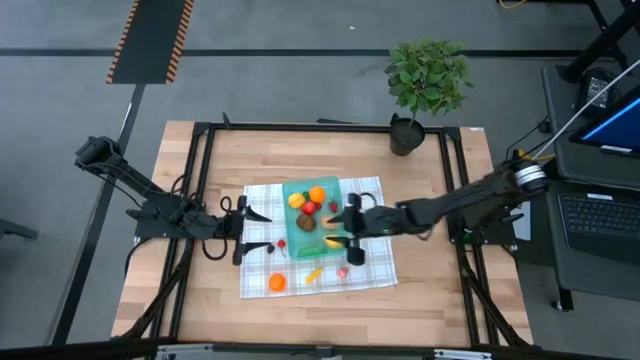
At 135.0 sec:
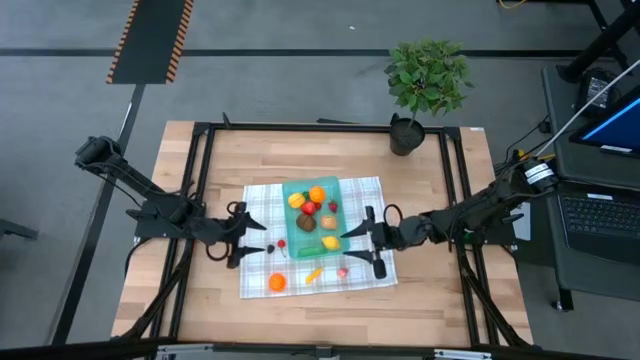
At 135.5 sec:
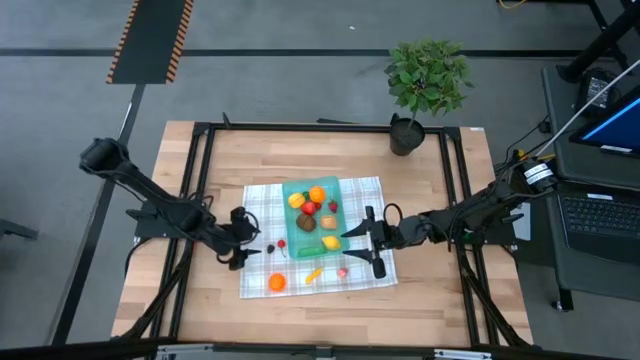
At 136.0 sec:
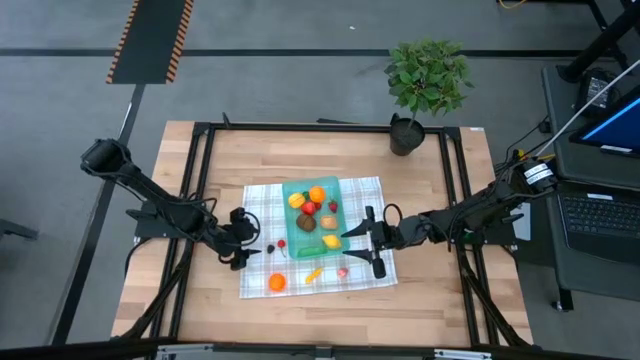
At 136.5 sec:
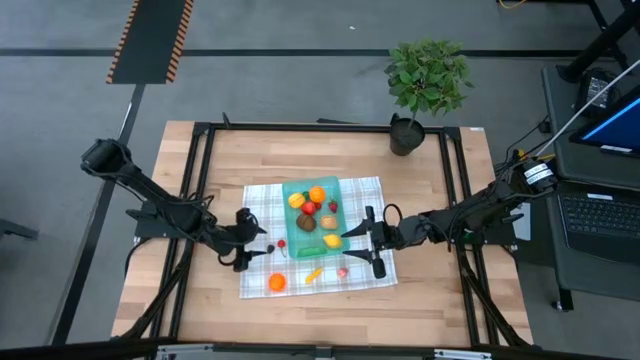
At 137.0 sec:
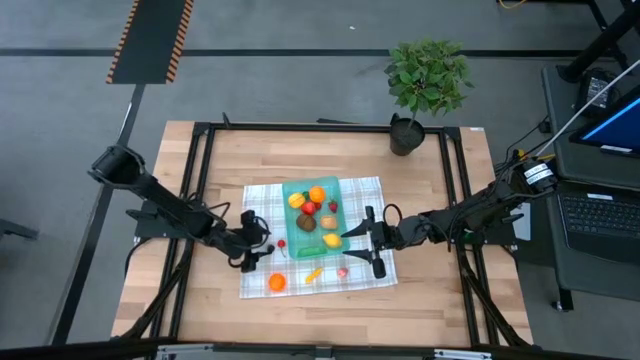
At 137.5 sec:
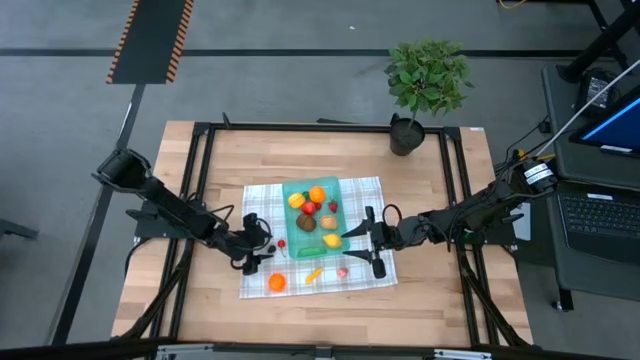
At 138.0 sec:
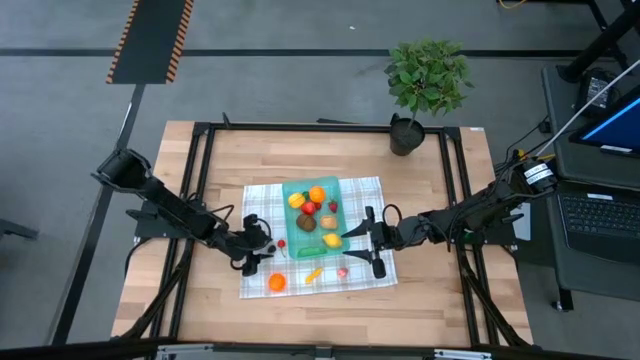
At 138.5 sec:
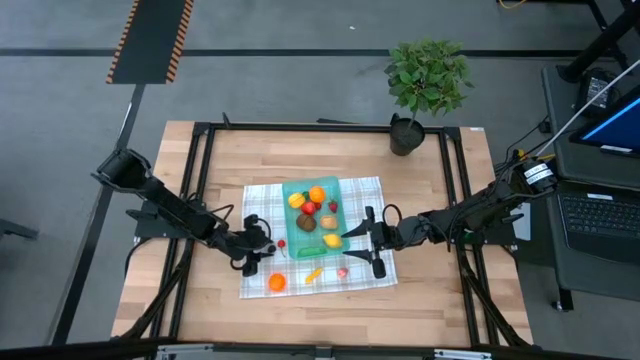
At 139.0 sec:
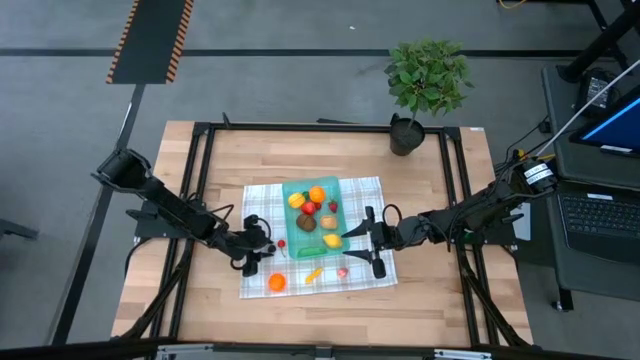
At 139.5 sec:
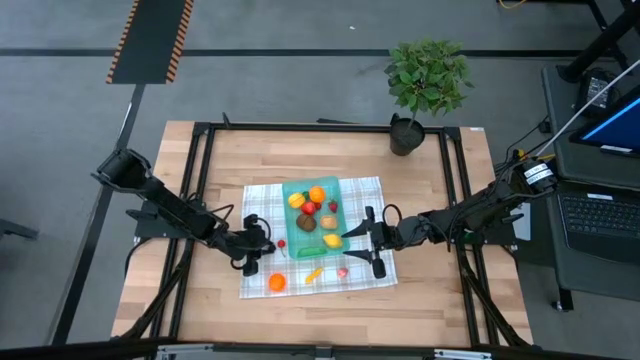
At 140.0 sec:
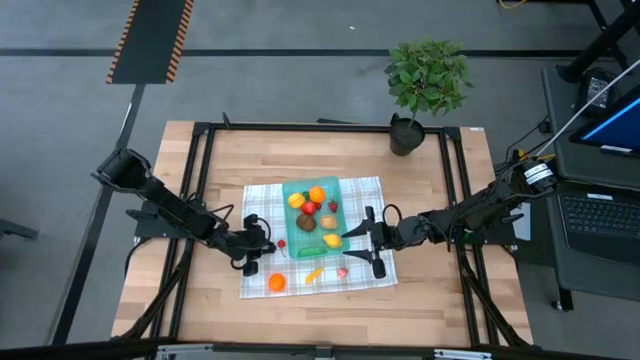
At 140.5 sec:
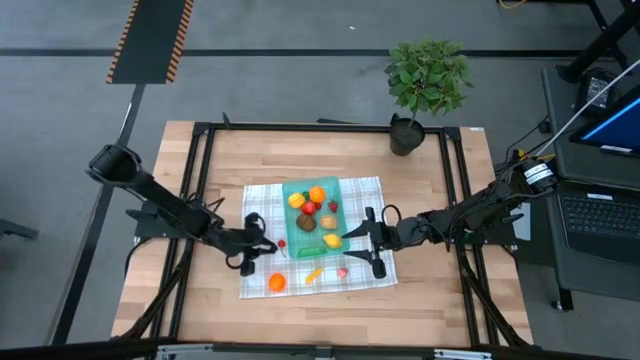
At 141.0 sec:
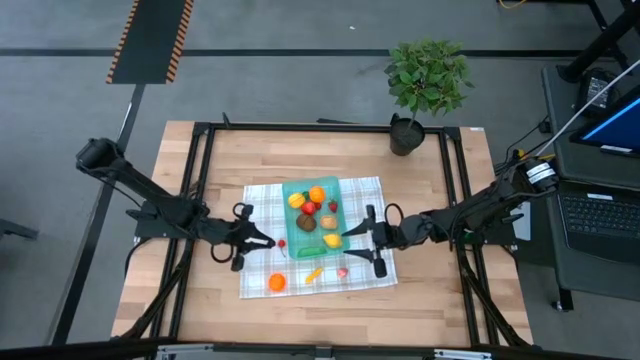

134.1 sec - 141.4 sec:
Task: Pick and placing Produce into tupperware
Put the black raspberry into the blue bin

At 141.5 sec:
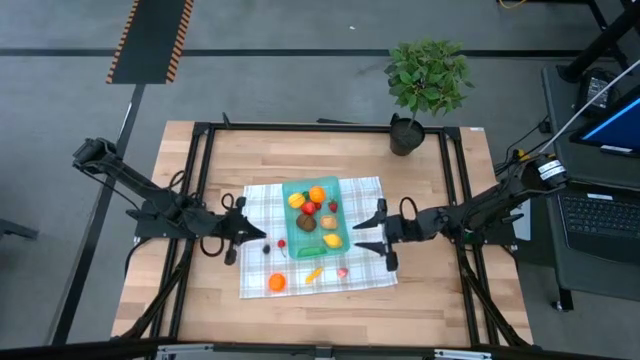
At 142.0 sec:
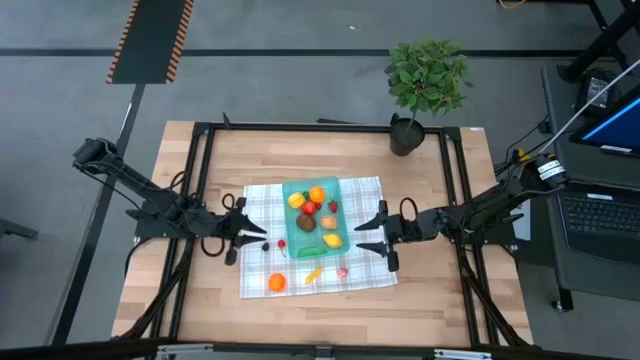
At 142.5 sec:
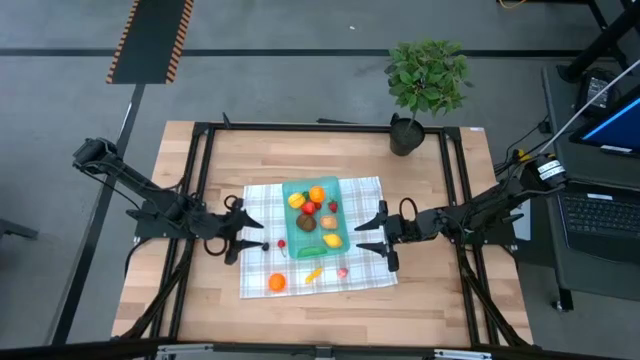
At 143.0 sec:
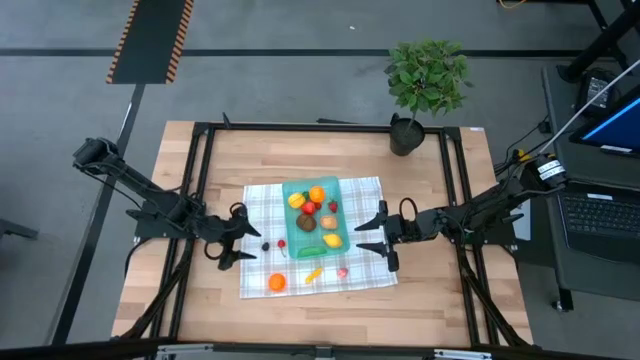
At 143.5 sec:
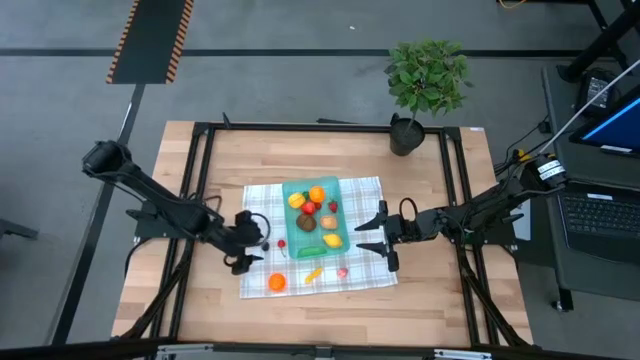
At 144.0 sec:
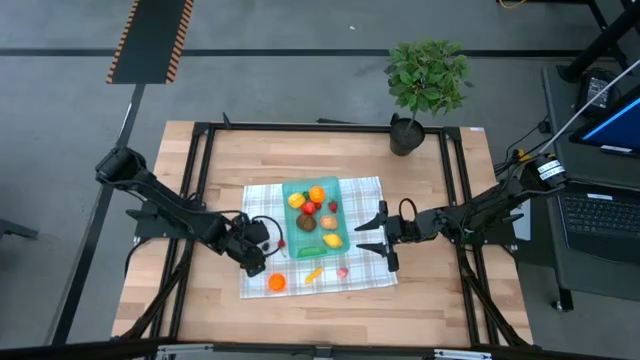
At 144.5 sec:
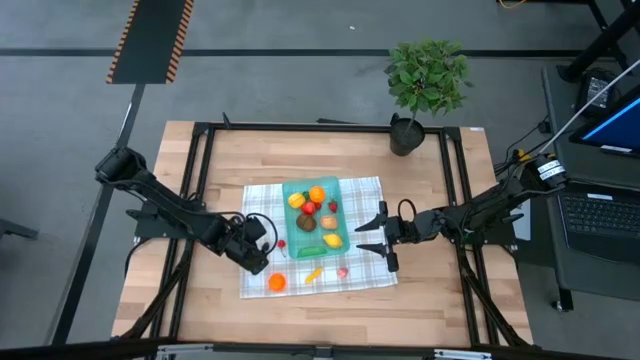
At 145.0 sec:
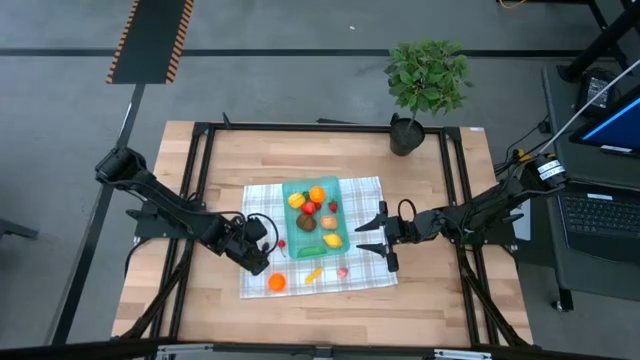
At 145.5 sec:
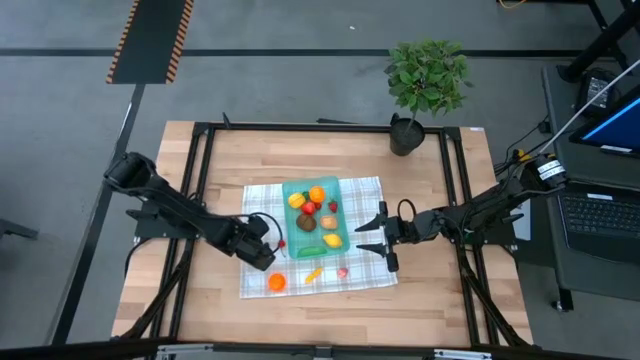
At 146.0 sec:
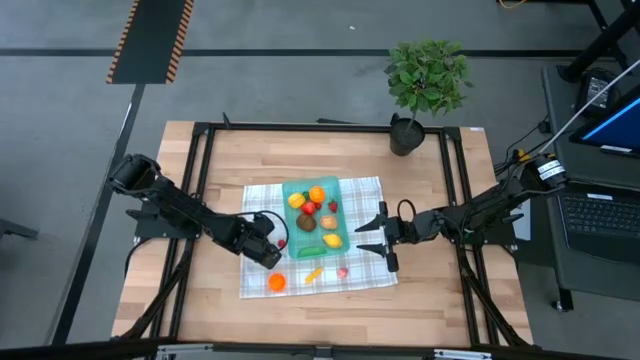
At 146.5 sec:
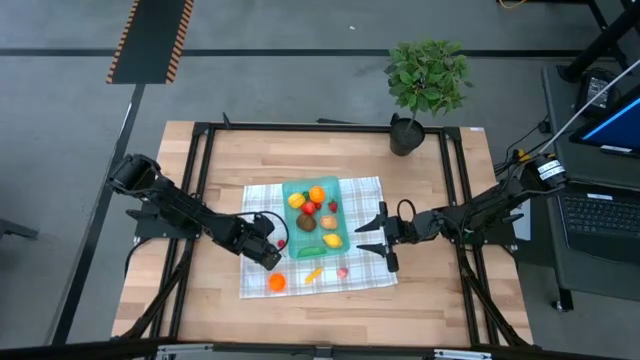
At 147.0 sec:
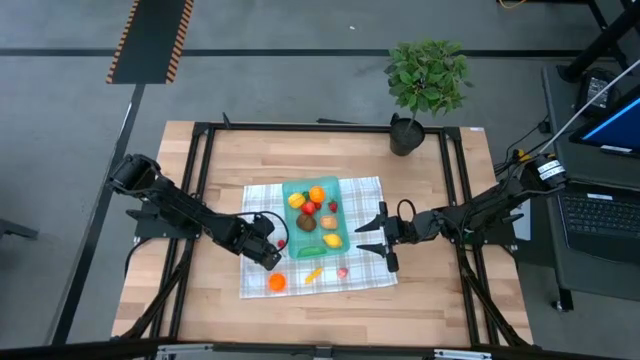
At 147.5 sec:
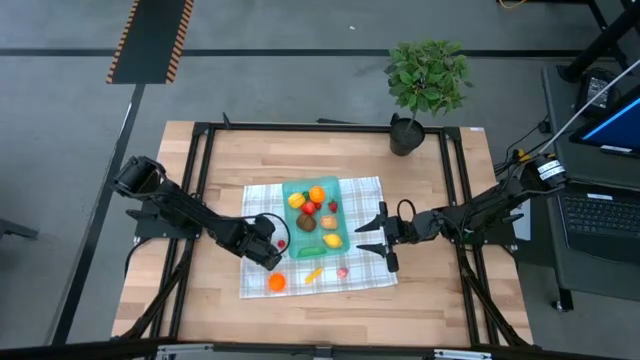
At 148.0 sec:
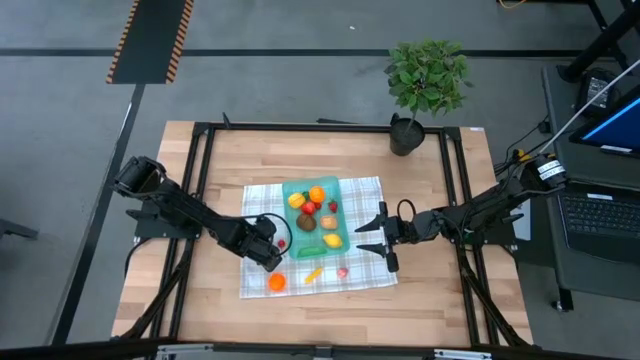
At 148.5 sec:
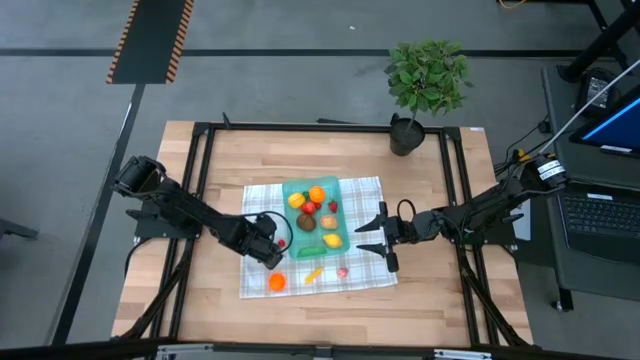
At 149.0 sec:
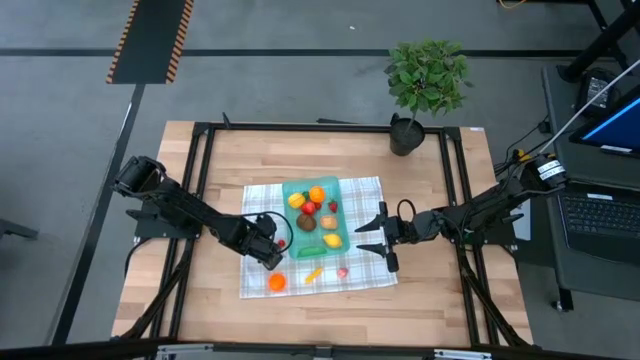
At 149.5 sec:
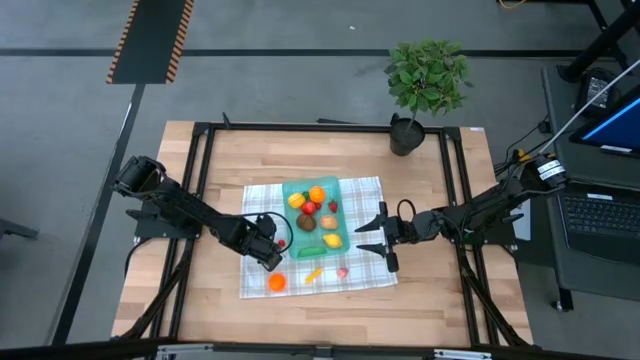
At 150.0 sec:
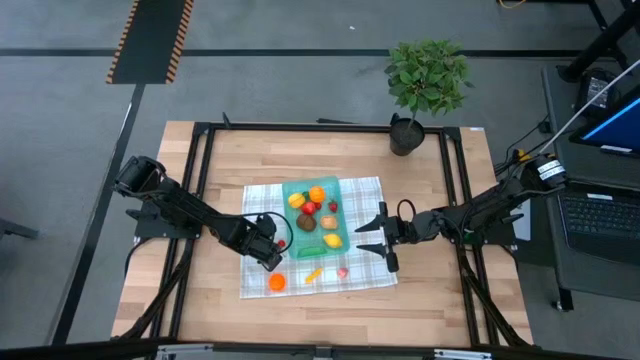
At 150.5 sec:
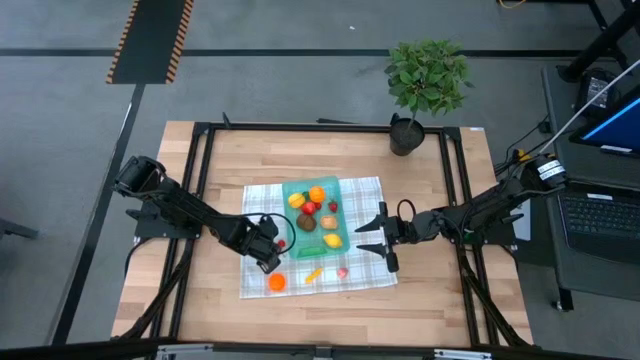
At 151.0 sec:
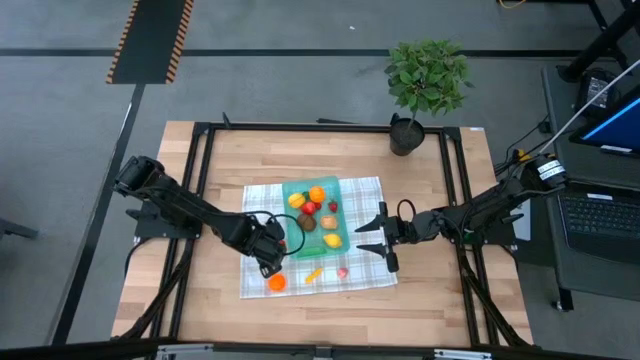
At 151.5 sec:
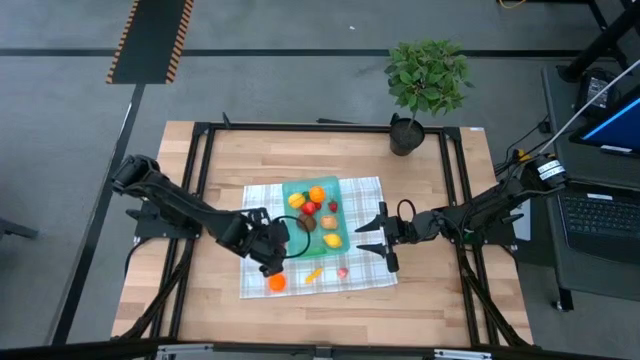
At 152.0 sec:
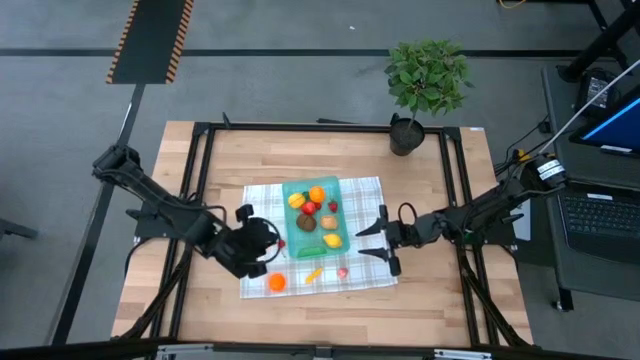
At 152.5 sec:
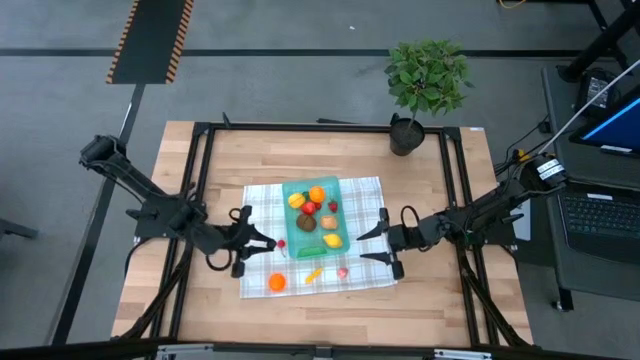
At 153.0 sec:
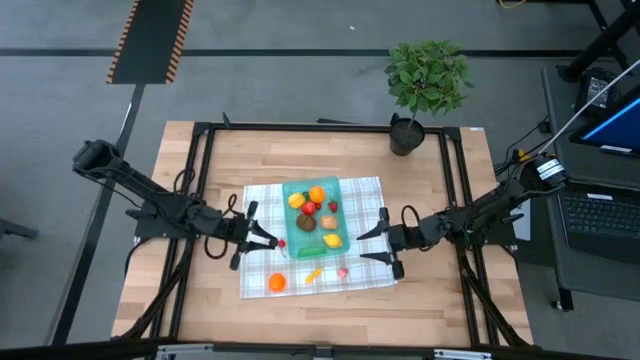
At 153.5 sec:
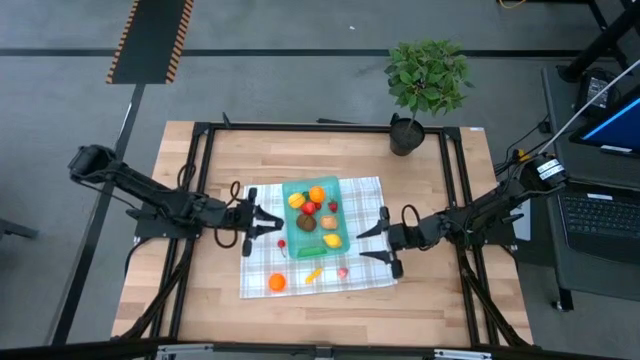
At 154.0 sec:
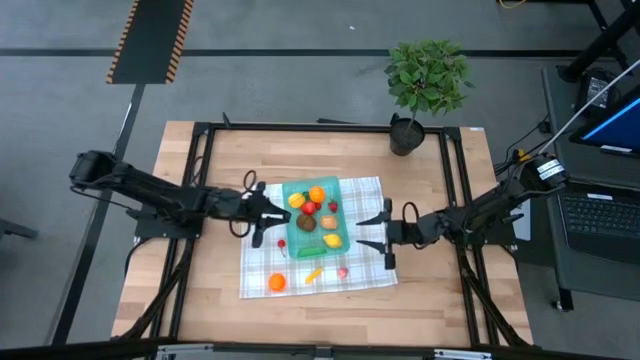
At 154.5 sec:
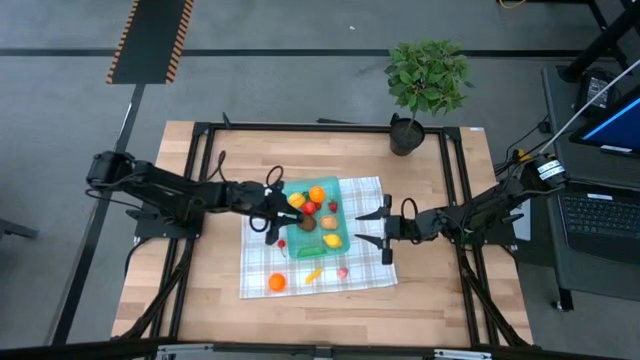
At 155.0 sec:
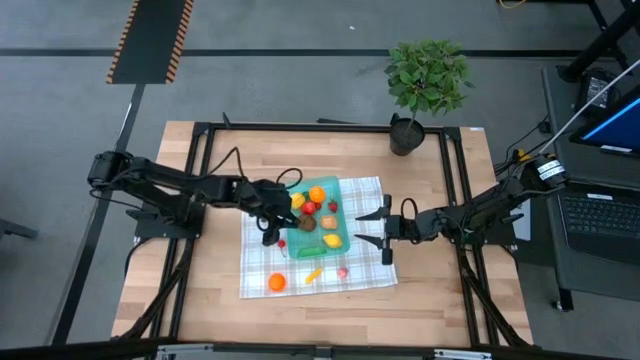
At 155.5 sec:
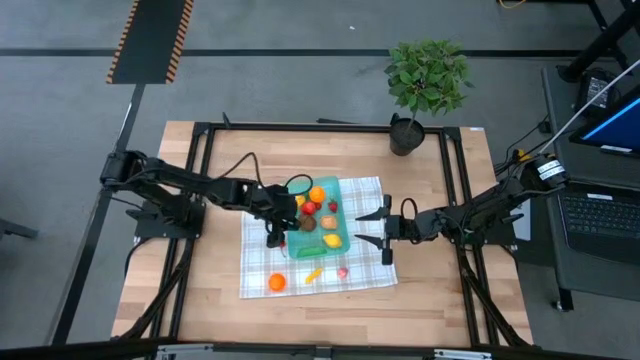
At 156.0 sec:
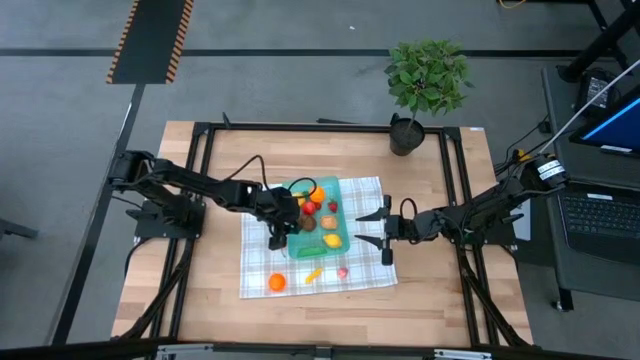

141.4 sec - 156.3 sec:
Put the black raspberry into the blue bin
